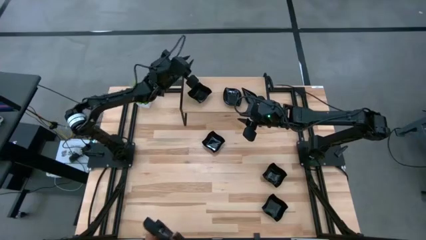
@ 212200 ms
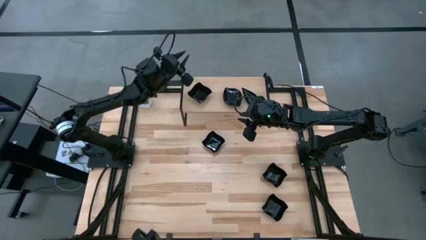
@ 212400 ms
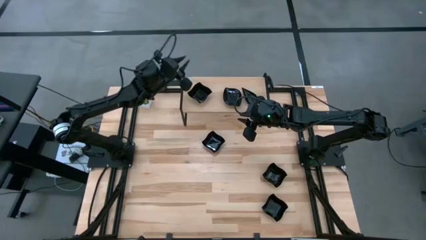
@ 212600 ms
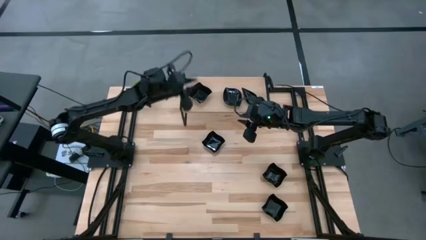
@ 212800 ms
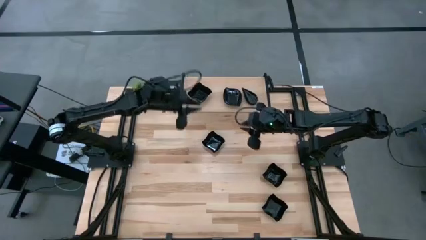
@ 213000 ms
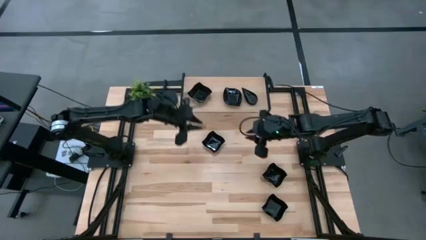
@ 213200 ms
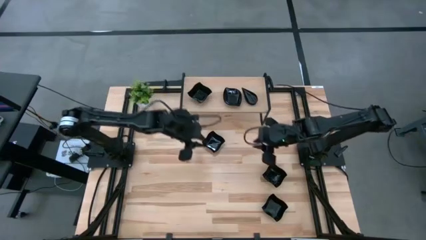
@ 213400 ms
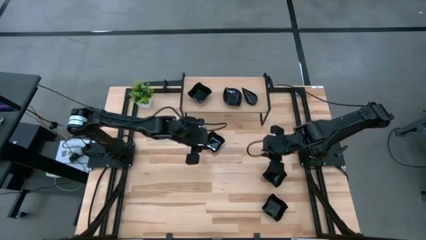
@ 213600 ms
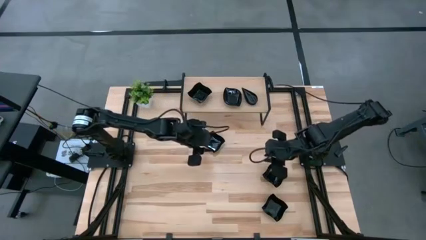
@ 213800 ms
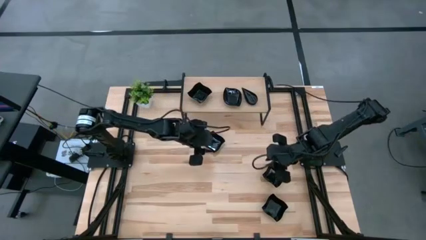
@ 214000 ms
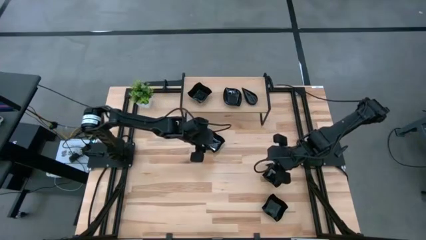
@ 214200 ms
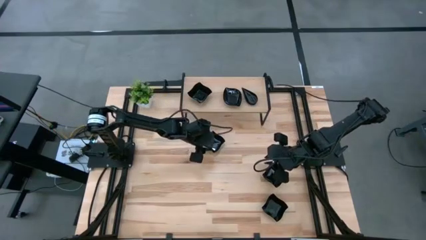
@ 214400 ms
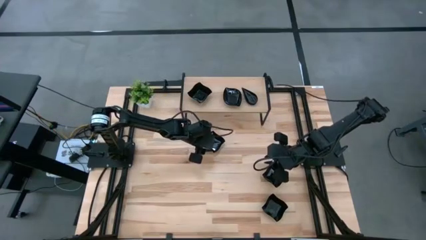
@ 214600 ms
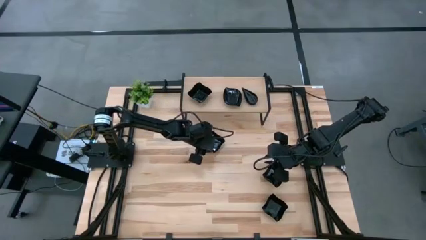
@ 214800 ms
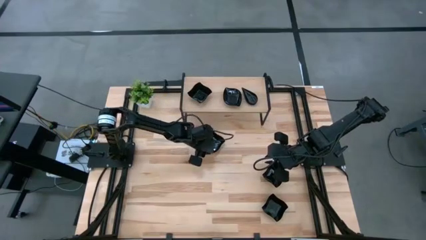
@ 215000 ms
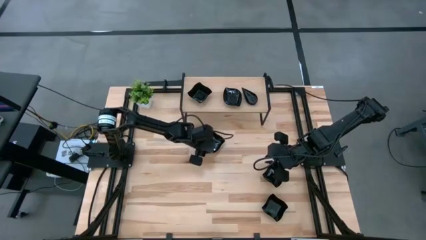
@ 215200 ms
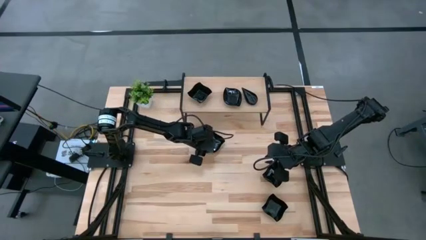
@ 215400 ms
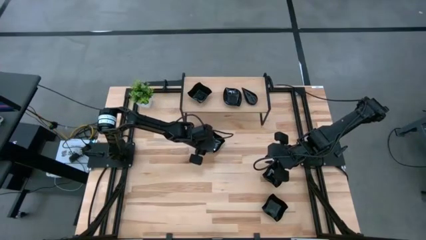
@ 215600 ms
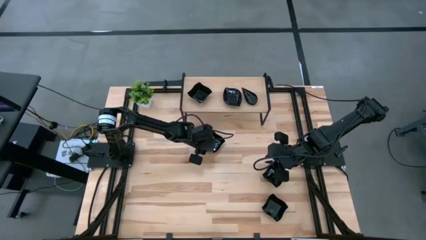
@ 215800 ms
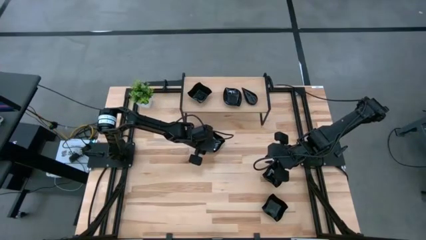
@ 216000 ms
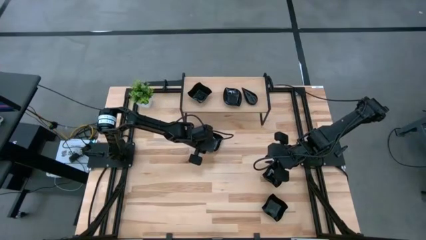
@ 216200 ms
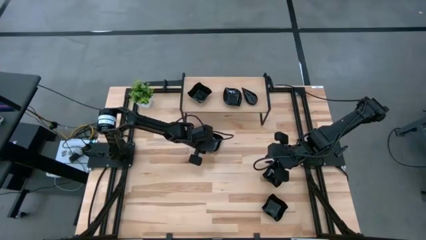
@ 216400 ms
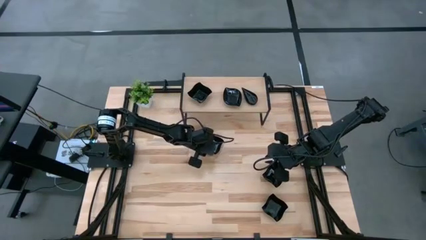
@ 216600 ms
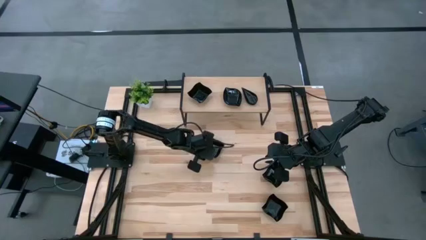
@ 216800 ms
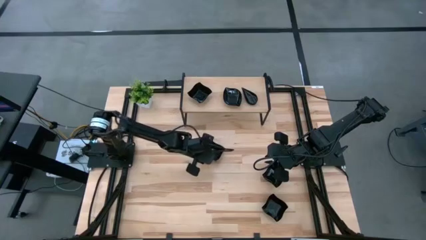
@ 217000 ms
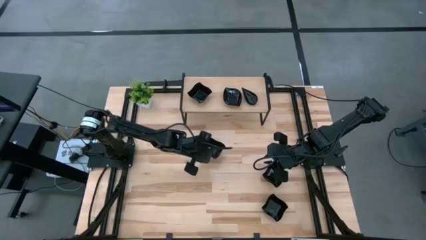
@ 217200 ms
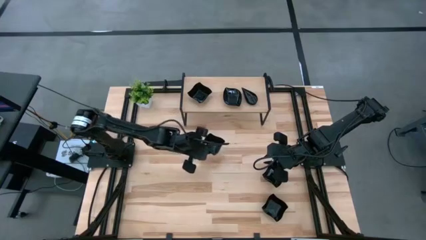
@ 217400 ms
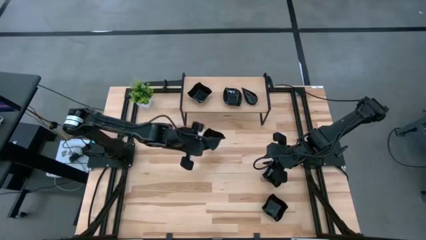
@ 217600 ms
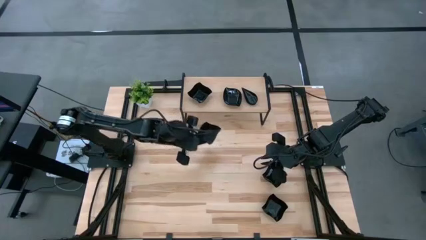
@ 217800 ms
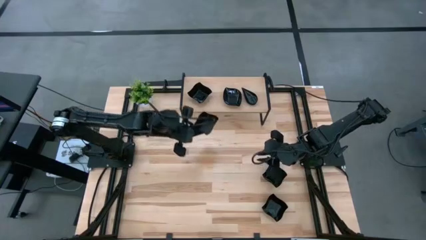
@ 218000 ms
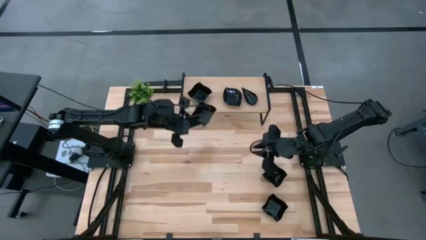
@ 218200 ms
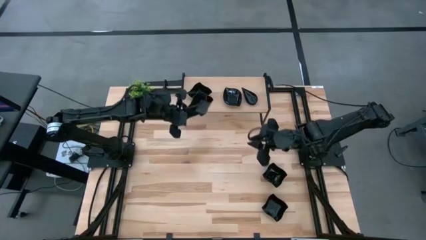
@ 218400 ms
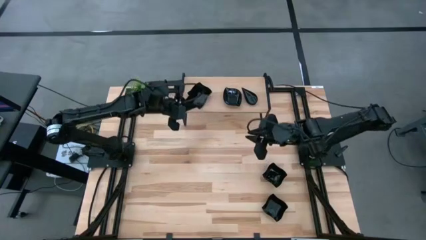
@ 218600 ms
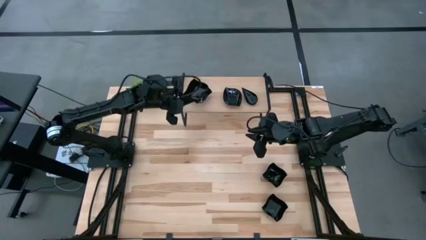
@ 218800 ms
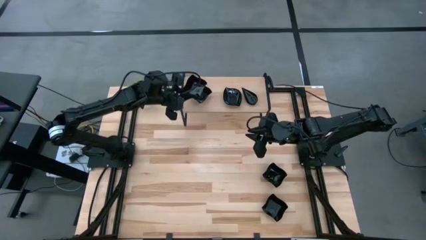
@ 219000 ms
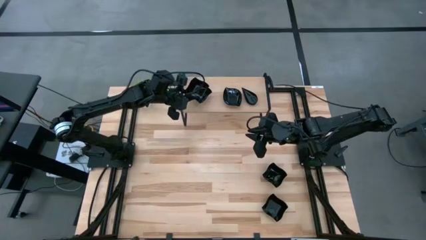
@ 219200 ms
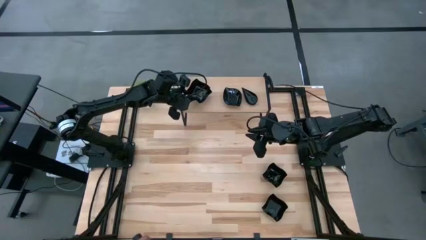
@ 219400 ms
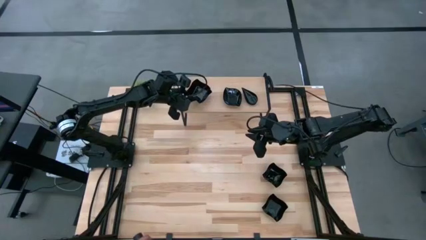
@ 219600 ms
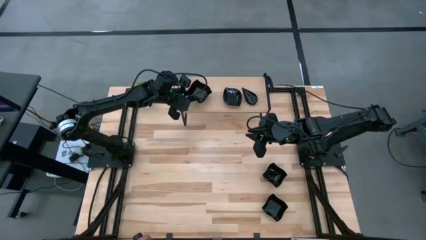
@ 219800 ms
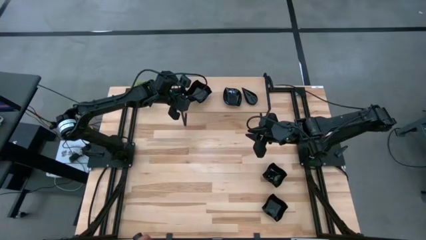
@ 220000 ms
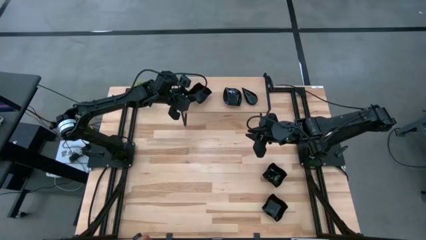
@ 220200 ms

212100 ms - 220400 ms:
Task: Pick & Place Mini shaped plates
Stack the black wave square shaped plate on top of the black wave square shaped plate on the shelf

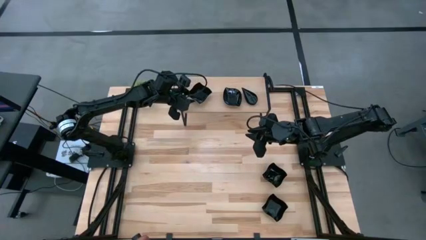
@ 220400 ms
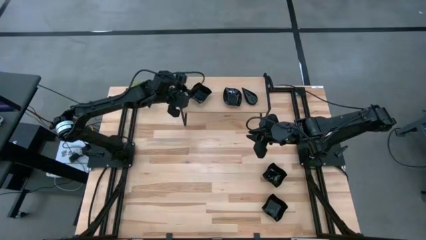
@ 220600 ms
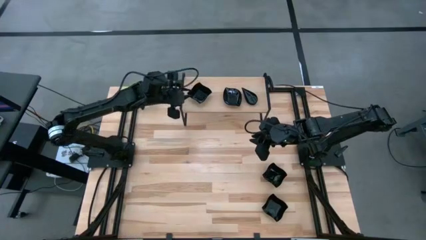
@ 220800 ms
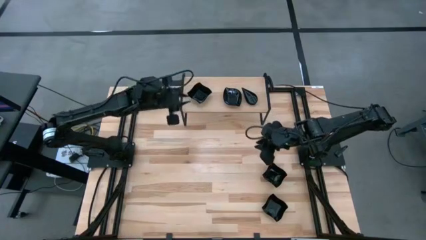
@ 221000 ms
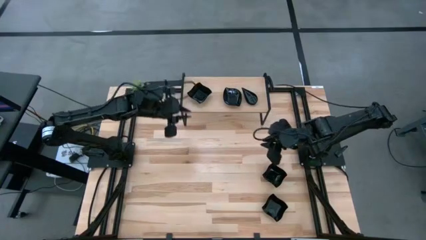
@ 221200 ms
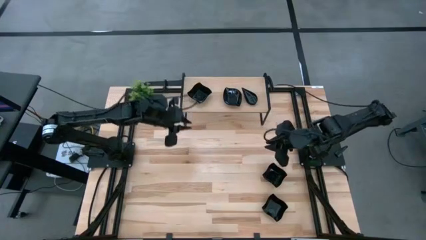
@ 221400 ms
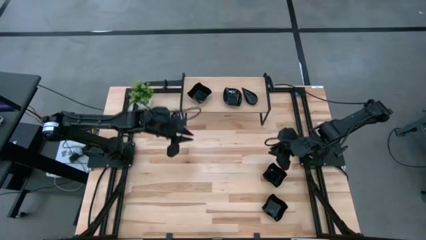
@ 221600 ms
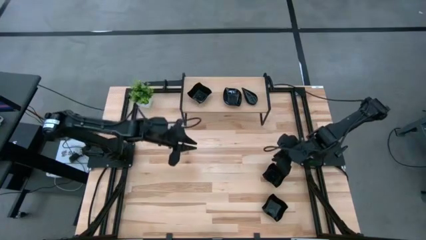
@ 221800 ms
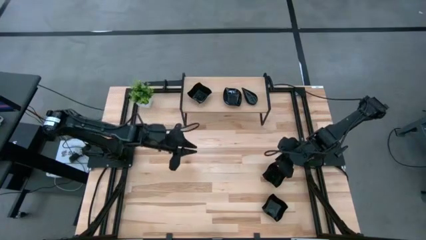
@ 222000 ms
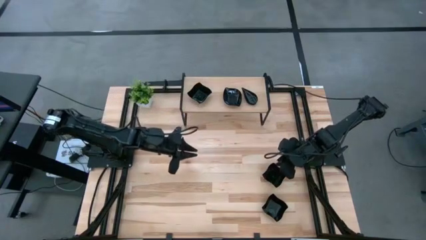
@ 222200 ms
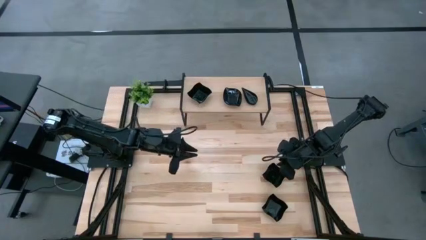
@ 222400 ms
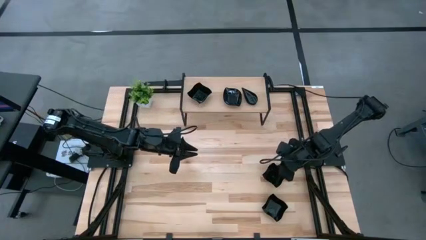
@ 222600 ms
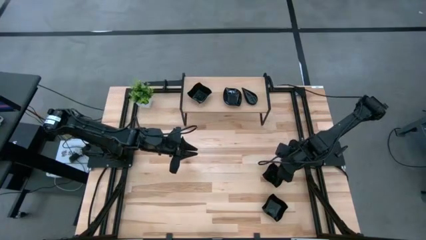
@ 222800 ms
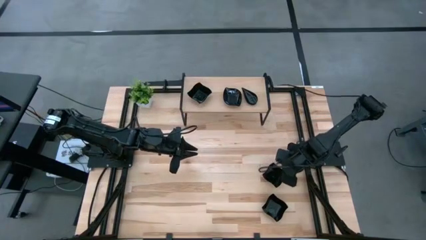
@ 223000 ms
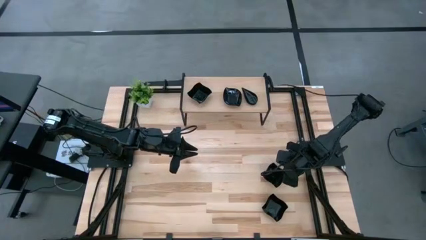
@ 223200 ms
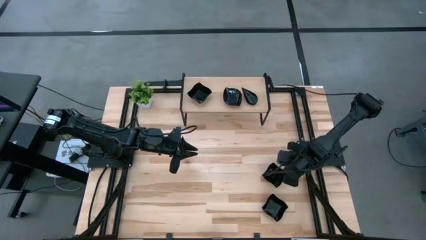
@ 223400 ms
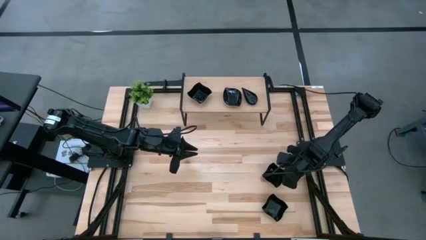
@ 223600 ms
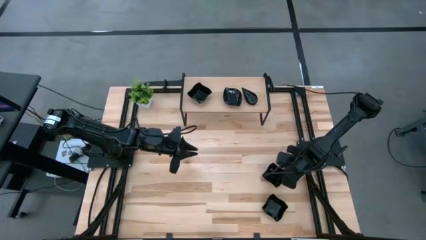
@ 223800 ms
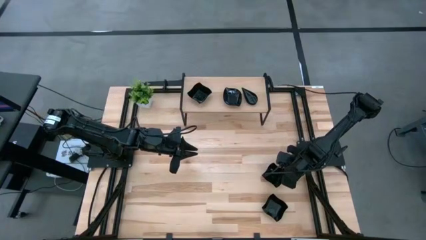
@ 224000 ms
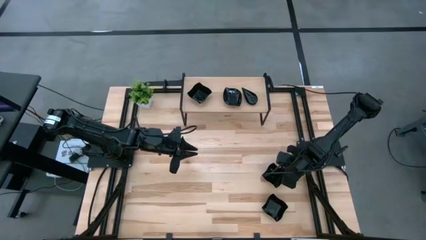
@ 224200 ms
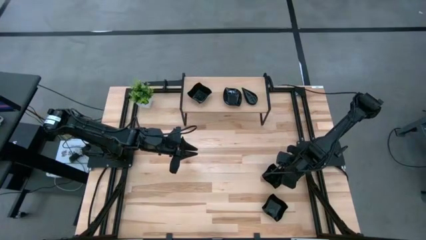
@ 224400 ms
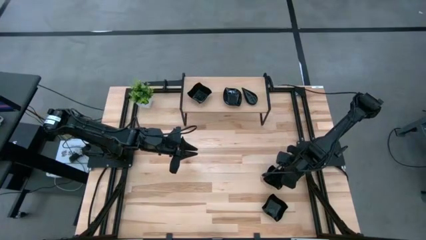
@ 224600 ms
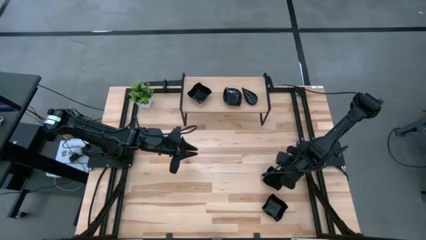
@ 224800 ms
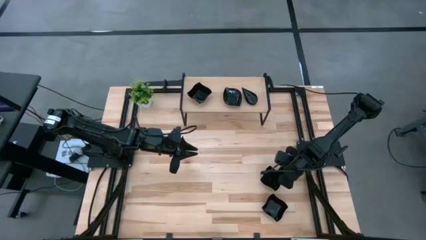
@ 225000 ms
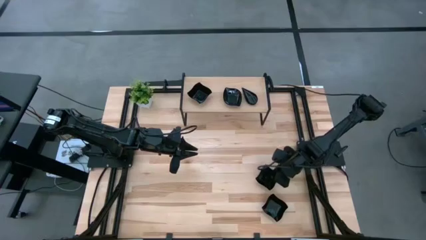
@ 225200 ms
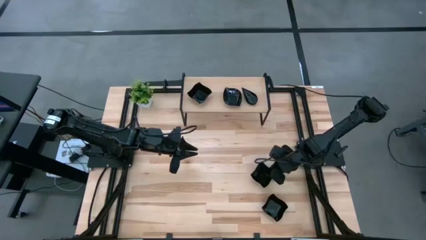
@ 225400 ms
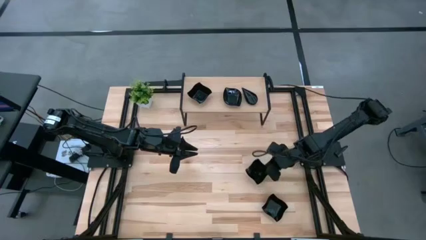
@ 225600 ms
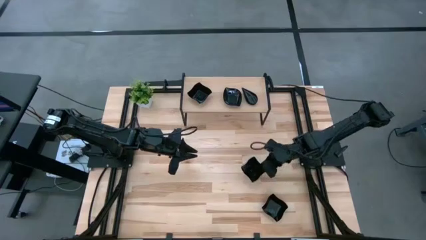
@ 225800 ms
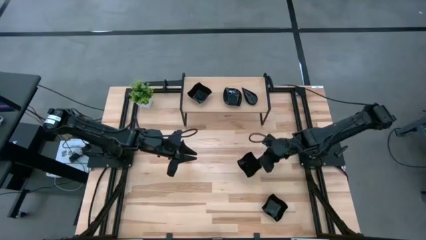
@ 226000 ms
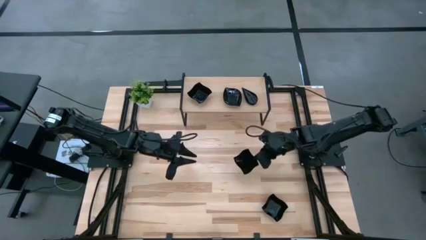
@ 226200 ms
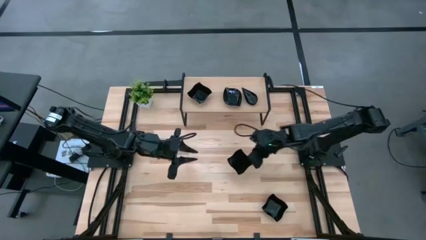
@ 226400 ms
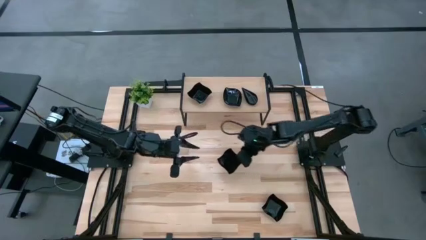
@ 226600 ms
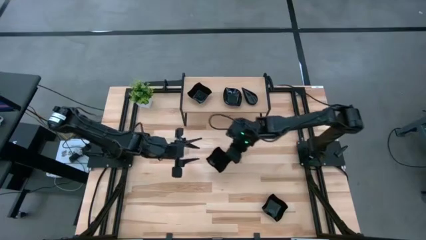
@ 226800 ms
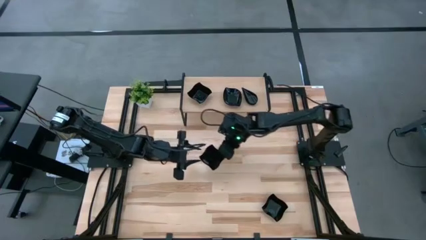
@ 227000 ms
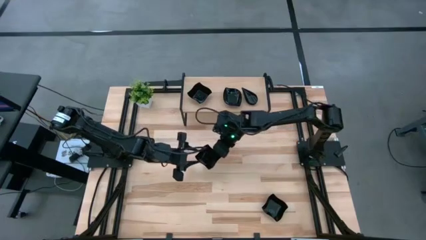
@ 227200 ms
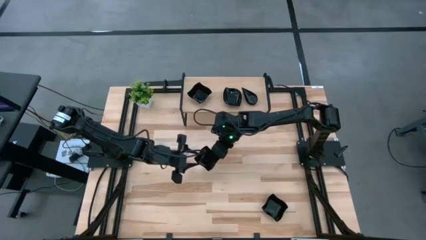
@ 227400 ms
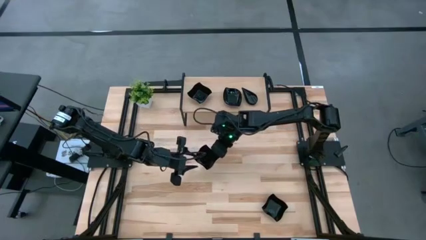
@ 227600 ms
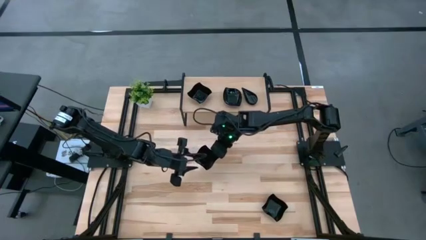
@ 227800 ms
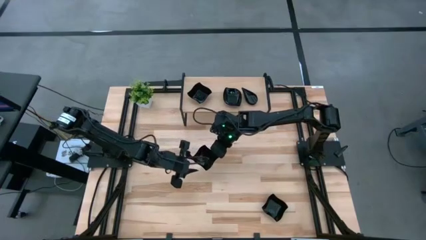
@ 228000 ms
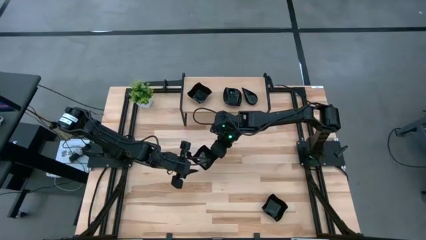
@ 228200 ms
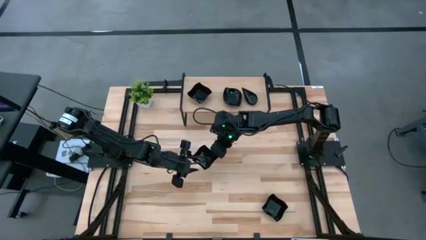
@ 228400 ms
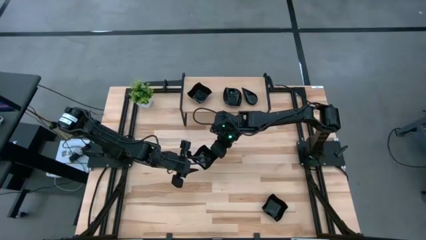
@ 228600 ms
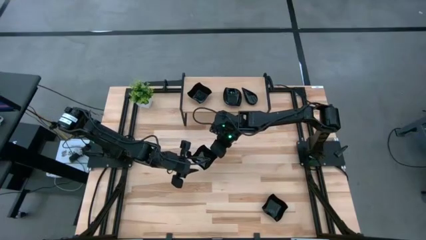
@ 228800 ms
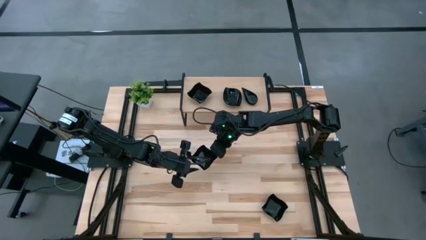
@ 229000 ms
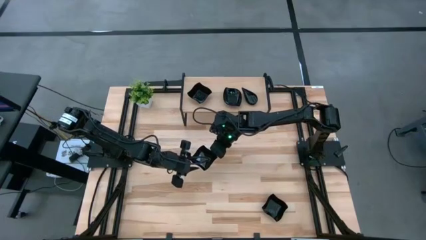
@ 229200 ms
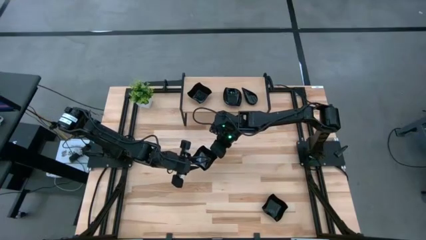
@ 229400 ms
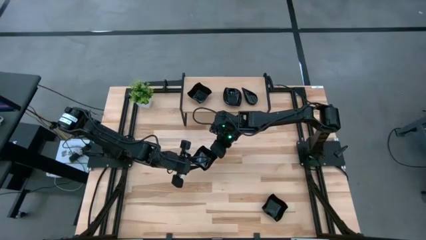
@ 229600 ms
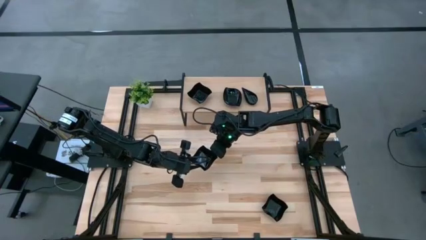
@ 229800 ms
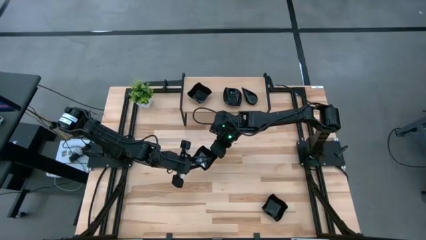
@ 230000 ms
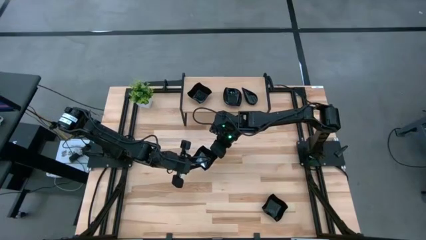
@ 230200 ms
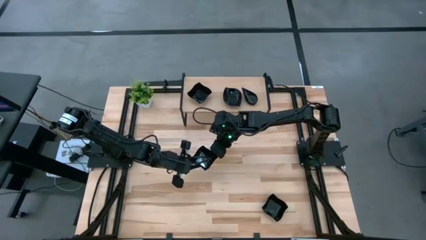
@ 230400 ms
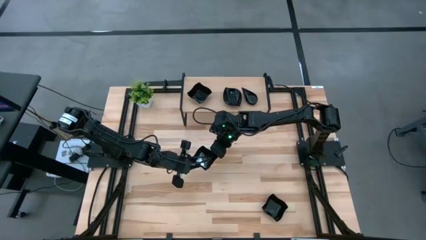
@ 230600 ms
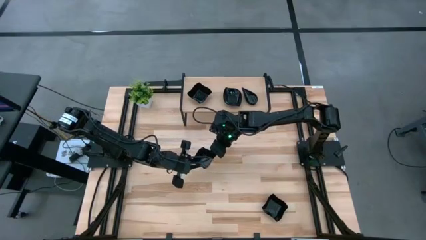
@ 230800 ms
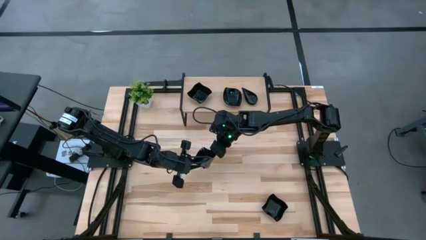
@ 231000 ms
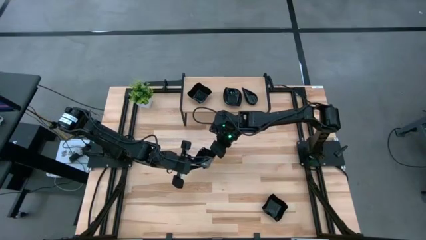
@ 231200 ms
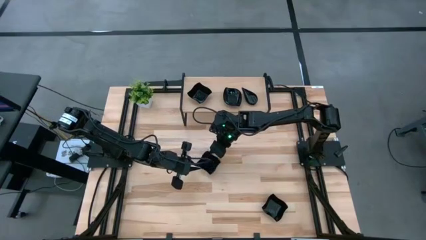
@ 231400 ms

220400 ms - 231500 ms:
Stack the black wave square shaped plate on top of the black wave square shaped plate on the shelf
